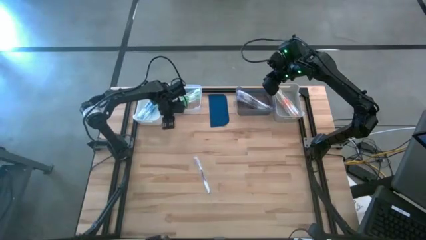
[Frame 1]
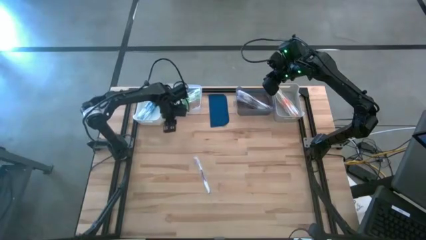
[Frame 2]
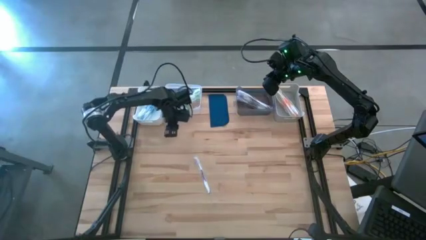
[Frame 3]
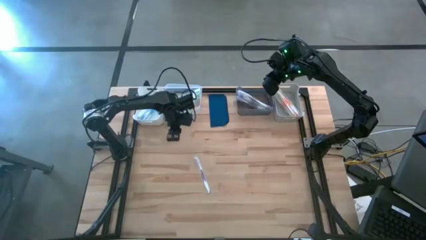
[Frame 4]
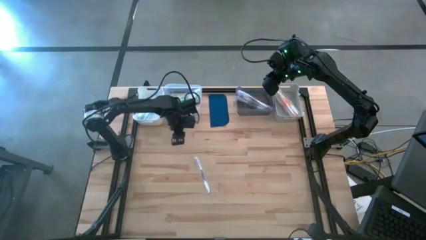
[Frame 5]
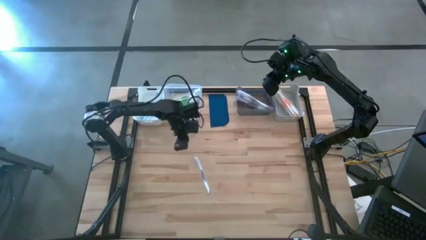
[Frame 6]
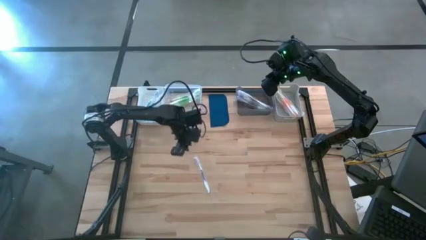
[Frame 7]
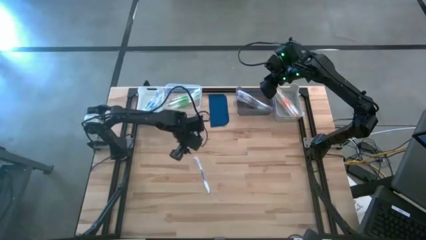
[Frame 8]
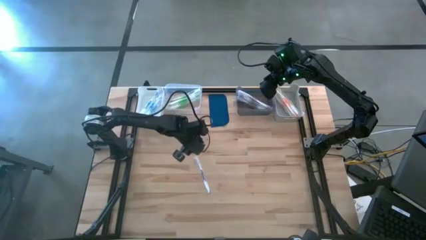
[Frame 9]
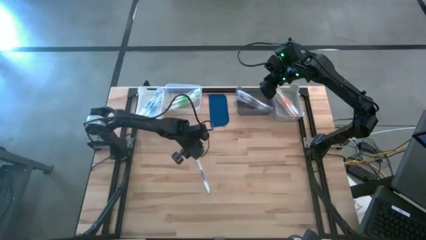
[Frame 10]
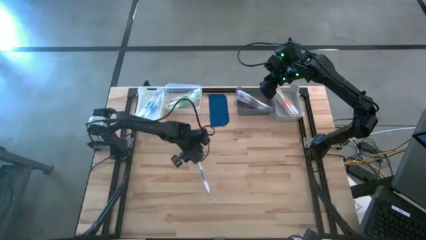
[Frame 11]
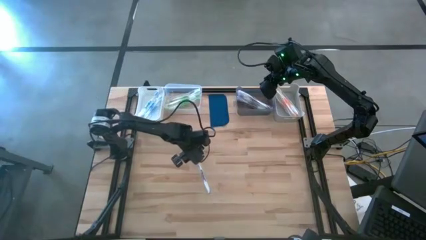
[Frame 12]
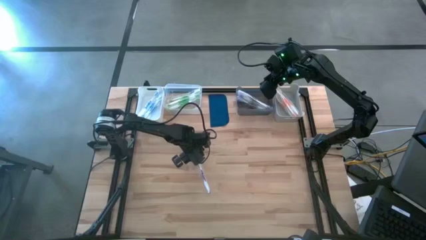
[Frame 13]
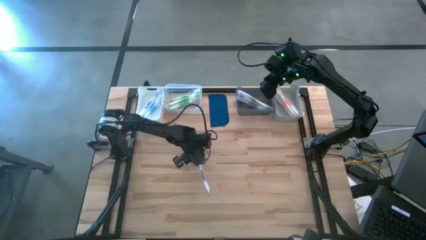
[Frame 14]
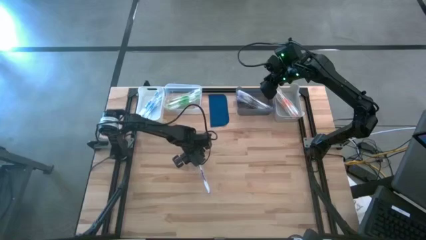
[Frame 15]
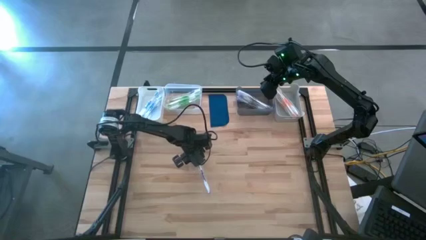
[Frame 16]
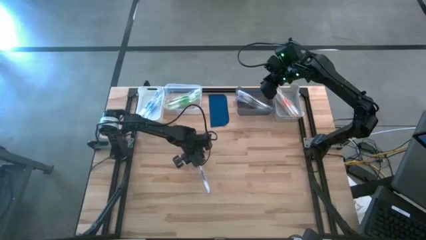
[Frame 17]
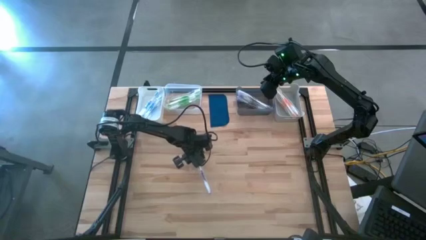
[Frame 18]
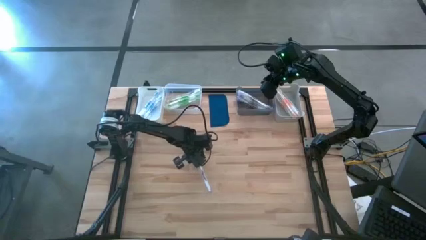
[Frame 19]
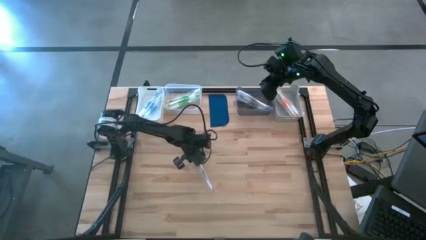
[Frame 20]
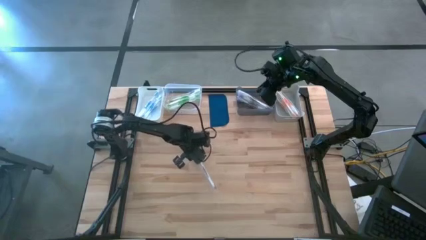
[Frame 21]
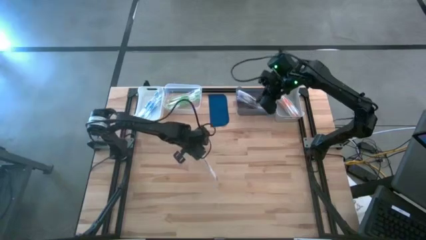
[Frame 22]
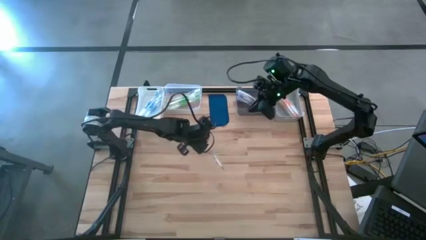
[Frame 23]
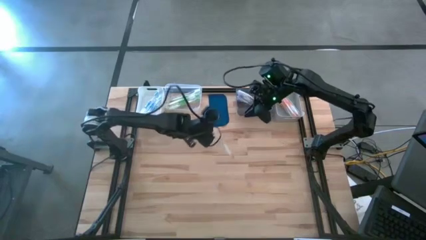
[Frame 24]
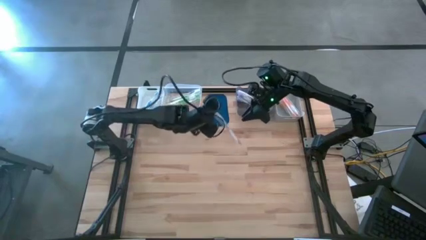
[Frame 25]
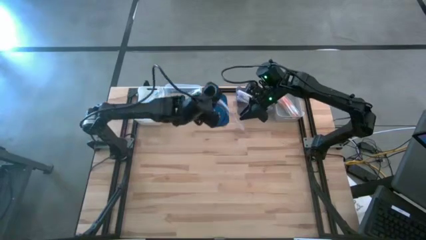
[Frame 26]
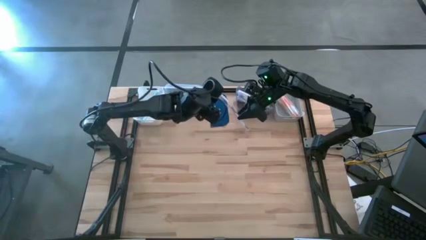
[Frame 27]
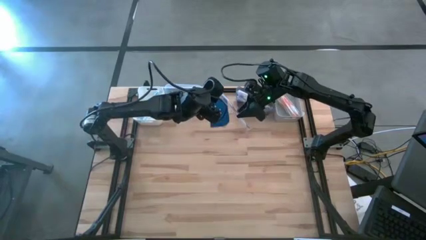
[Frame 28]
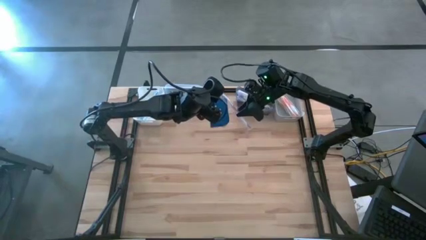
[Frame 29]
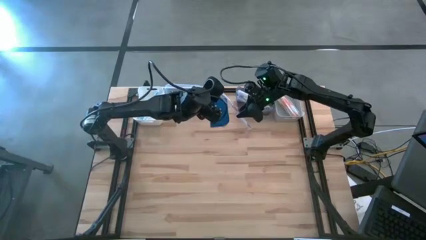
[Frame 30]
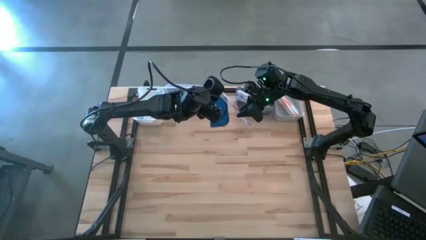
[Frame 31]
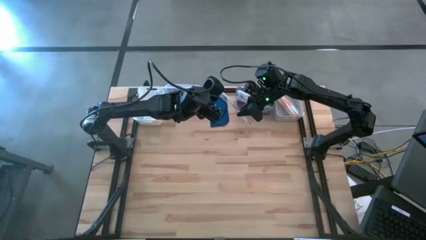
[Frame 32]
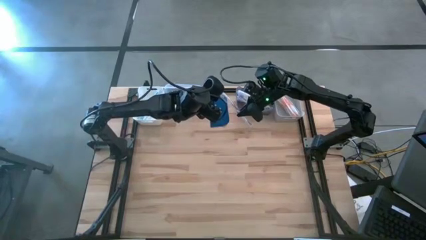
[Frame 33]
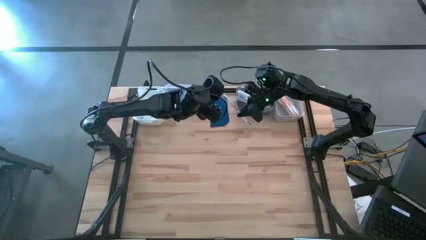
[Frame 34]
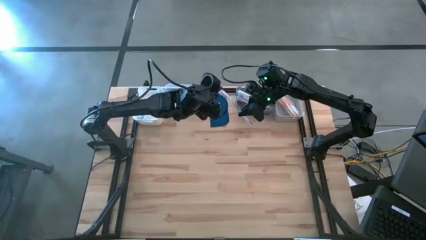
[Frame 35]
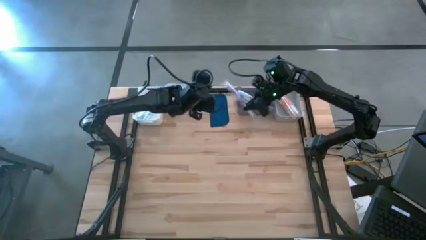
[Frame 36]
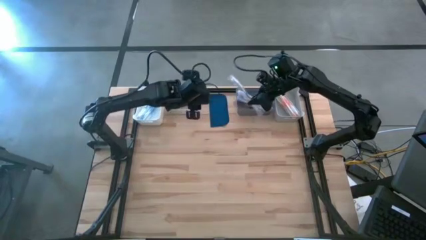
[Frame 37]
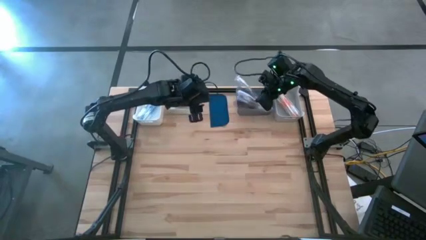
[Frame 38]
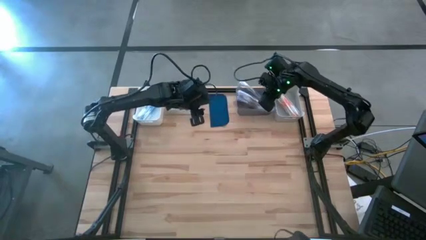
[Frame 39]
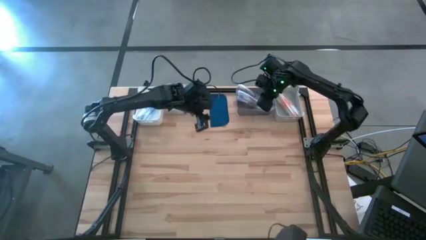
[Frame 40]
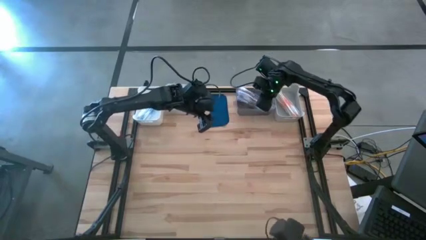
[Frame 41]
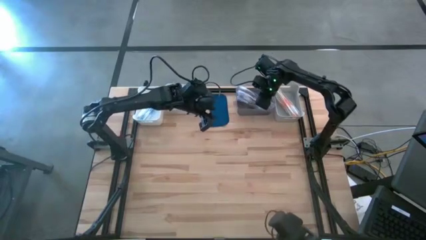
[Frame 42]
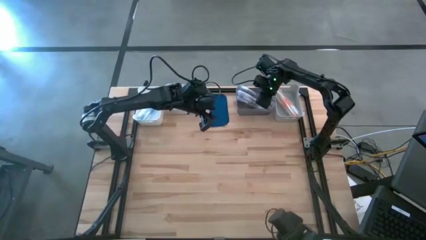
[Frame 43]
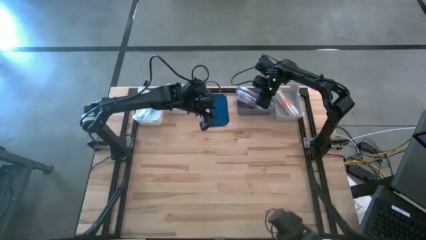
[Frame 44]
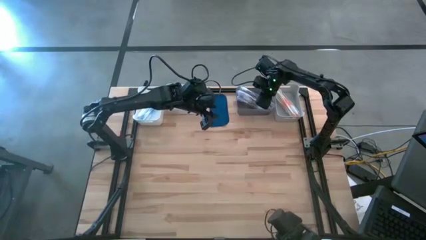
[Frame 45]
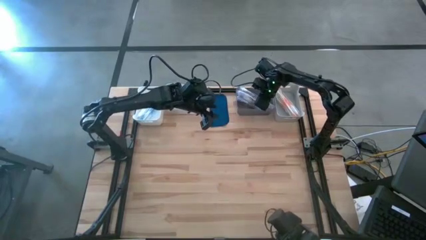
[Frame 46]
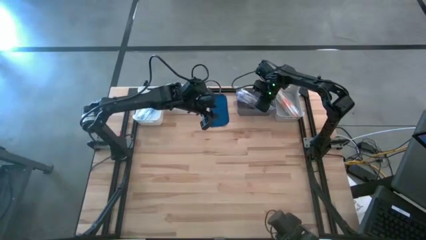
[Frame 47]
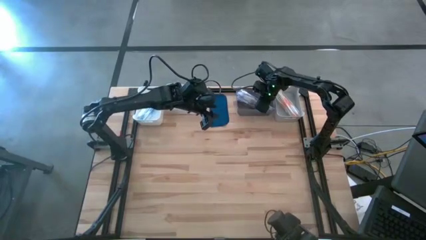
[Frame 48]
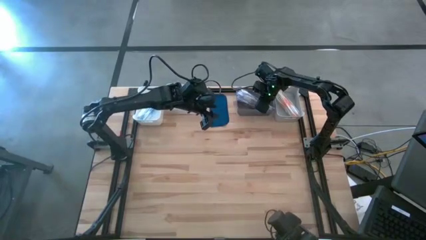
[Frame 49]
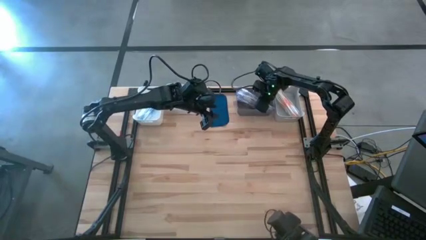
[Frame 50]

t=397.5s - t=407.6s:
Task: Pick & Place Toothbrushes
Put the purple toothbrush into the black bin

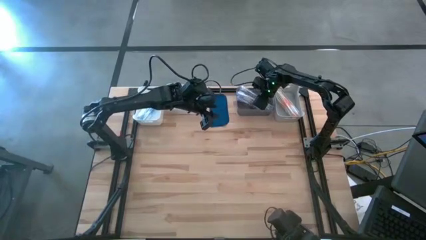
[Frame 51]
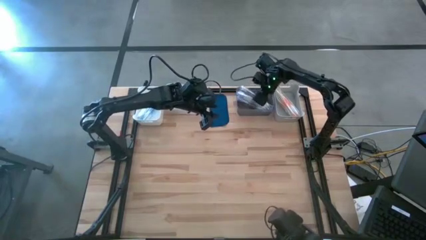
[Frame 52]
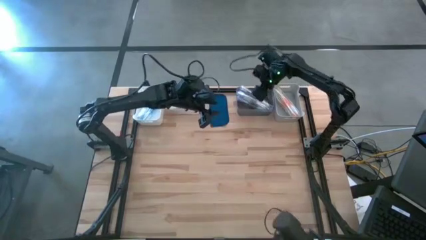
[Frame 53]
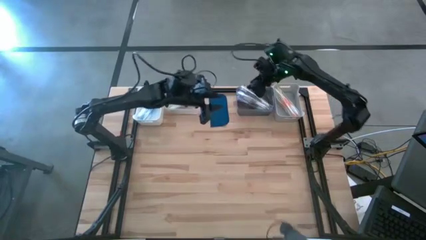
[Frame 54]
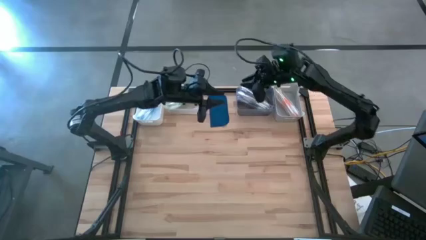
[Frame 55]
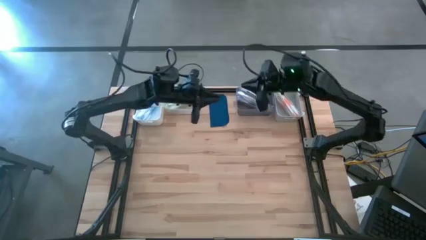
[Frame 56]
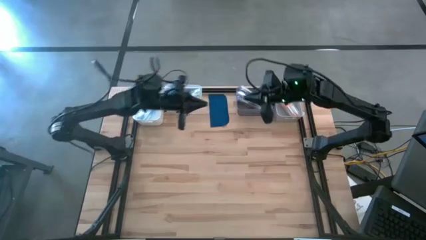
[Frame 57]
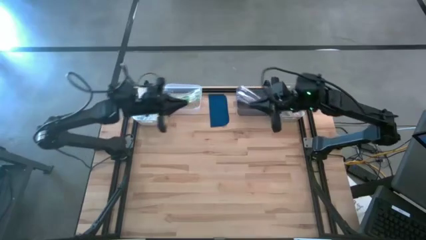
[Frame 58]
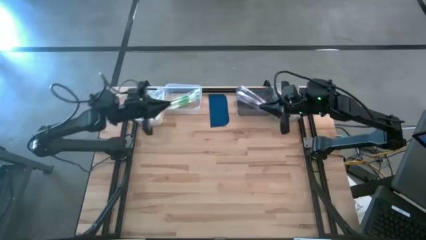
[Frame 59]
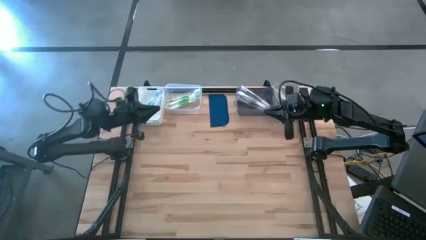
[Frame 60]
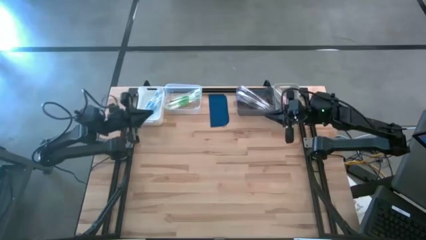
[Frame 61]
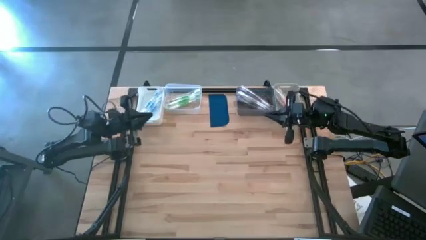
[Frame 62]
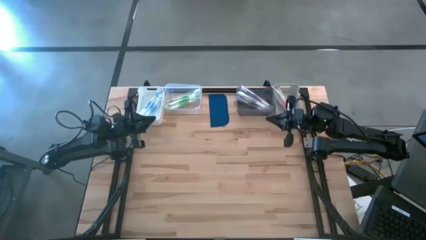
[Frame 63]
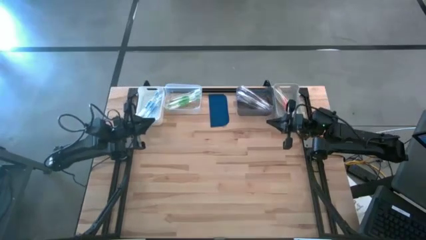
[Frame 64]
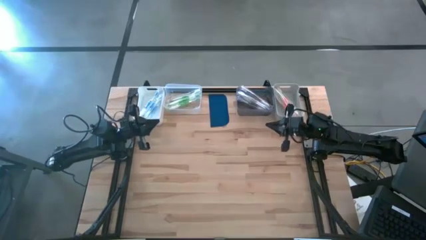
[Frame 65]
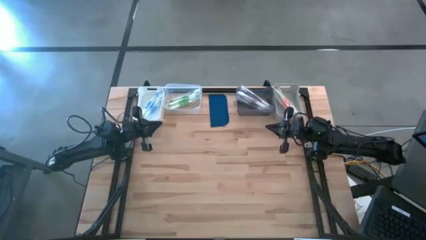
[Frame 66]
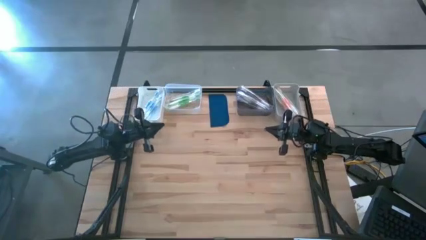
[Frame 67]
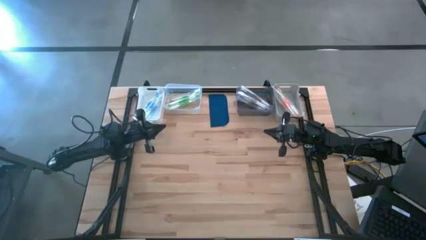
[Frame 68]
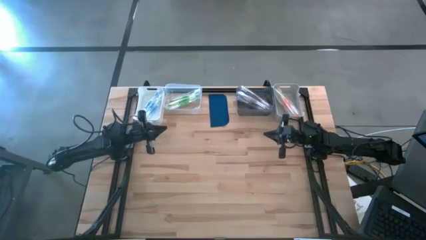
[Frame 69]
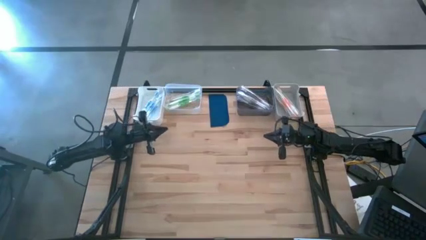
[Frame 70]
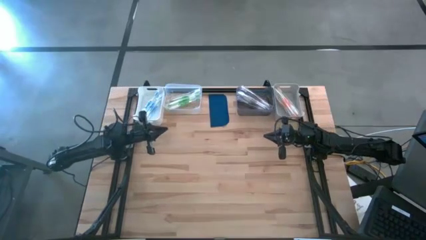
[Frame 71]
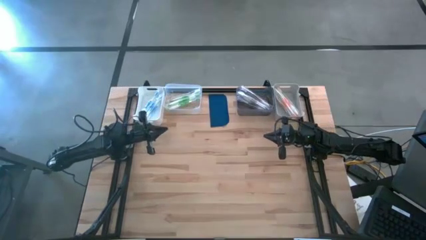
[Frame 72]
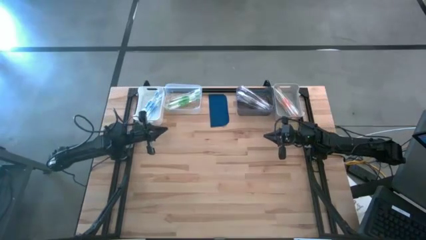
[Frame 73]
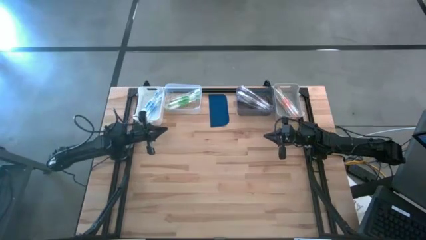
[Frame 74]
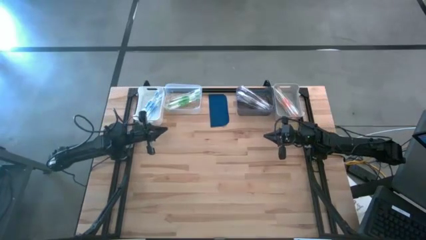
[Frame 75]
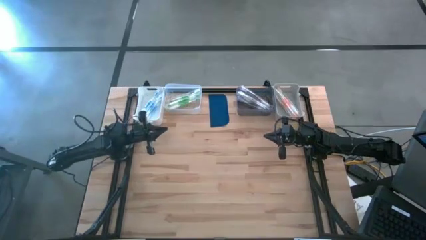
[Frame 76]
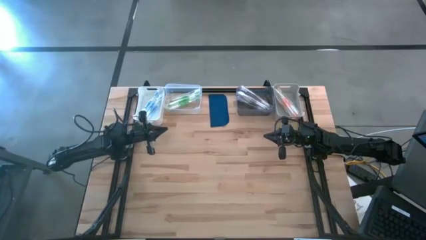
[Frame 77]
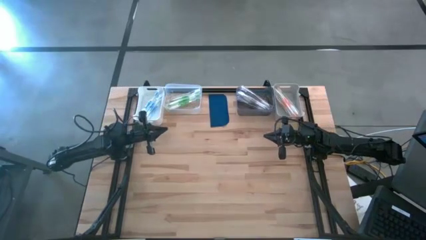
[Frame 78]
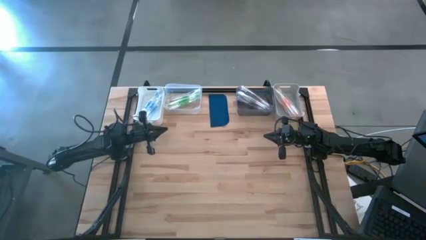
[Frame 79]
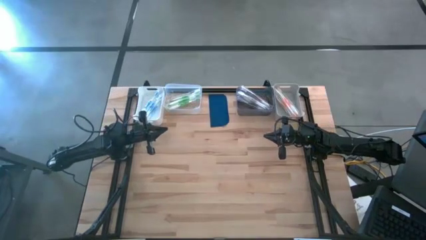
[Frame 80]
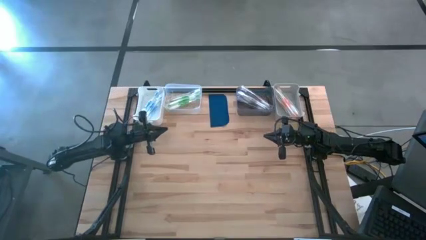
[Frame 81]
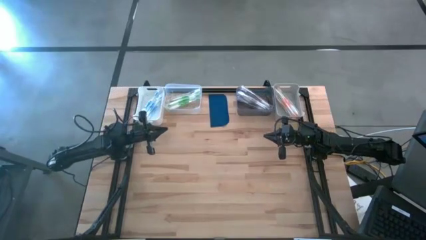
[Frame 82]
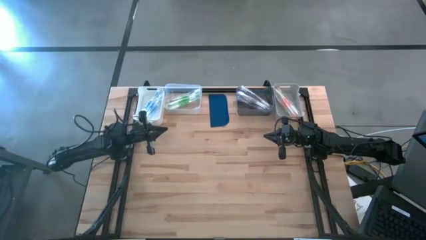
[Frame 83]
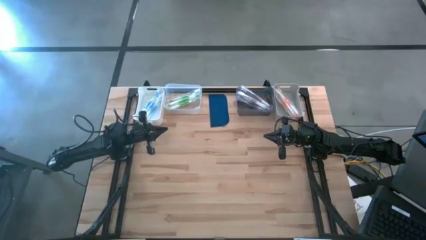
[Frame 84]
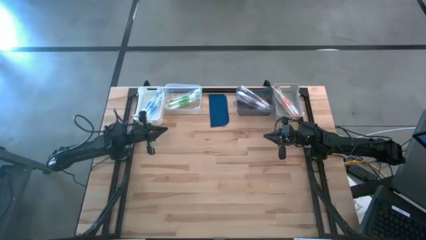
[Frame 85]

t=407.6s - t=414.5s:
Return to Home Position

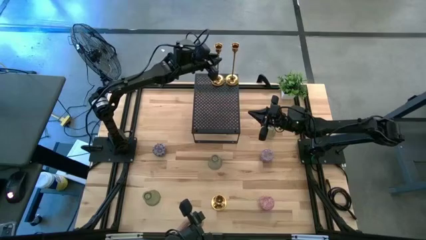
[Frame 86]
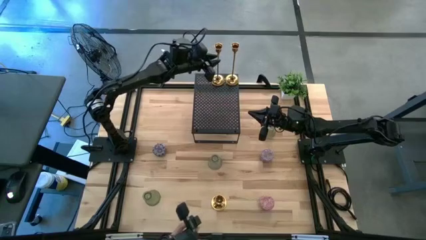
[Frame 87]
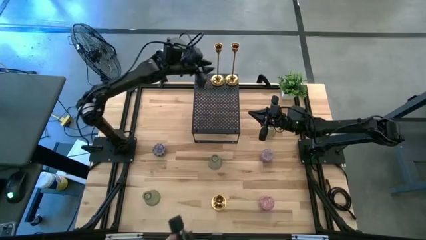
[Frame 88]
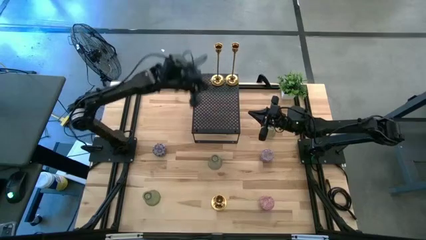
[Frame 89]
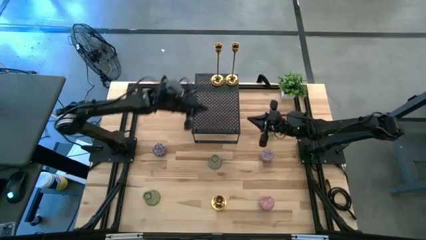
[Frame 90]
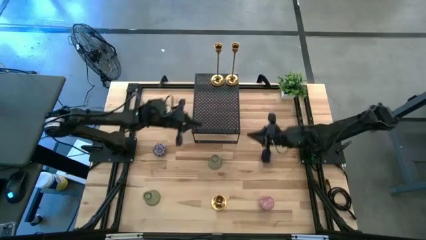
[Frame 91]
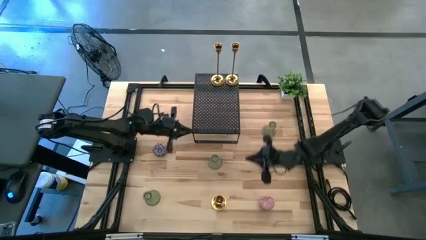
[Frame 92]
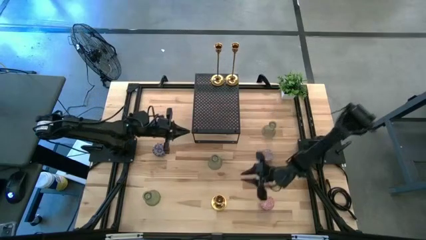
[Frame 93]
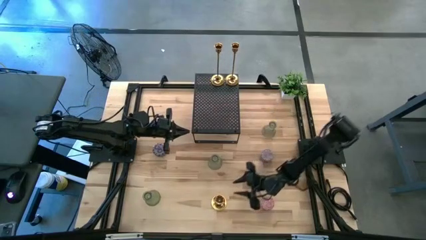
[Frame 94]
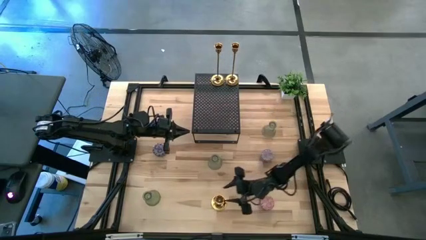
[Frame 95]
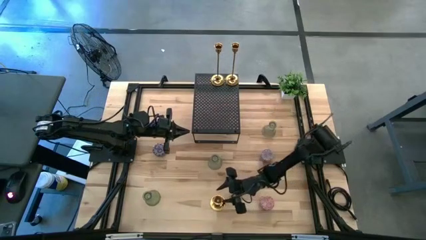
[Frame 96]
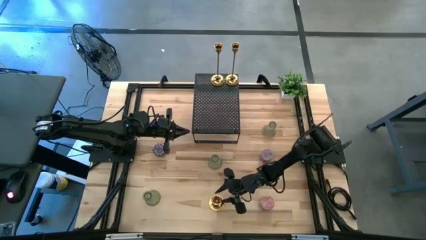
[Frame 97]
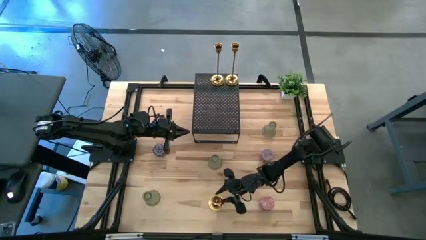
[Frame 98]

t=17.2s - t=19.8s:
Task: Pick & Place candle stick holders
Put the gold candle holder on the shelf
